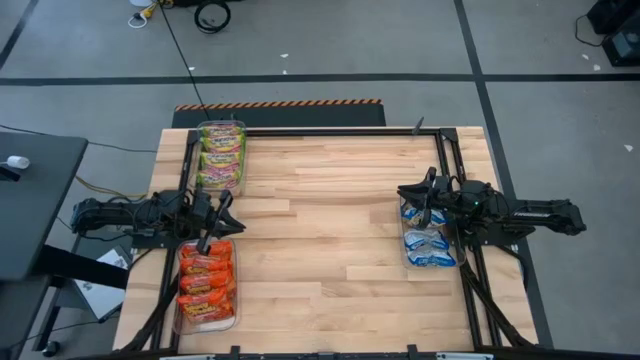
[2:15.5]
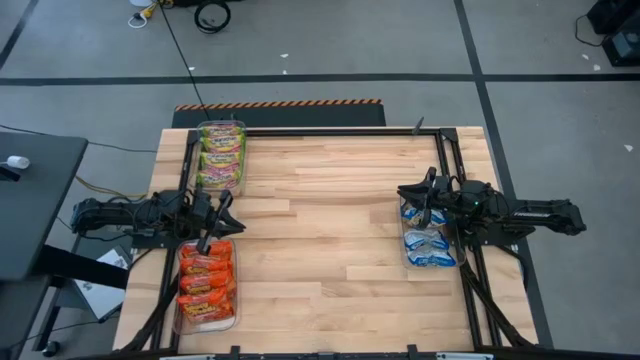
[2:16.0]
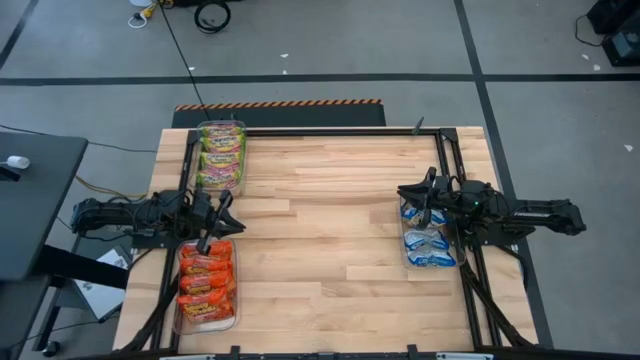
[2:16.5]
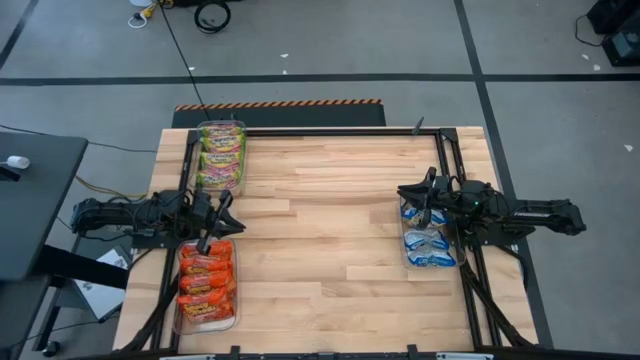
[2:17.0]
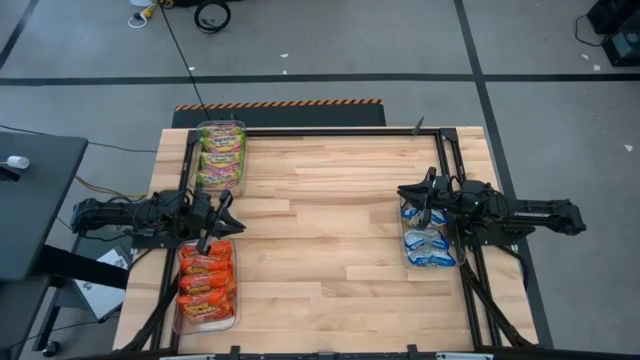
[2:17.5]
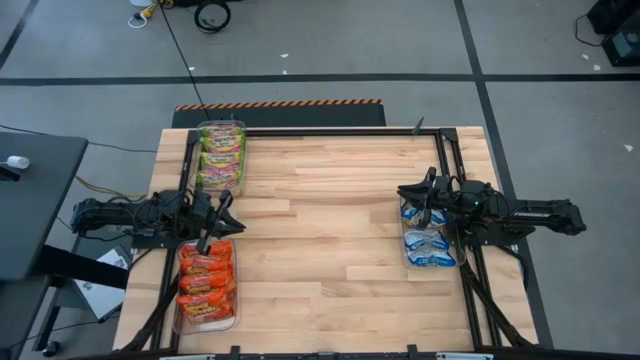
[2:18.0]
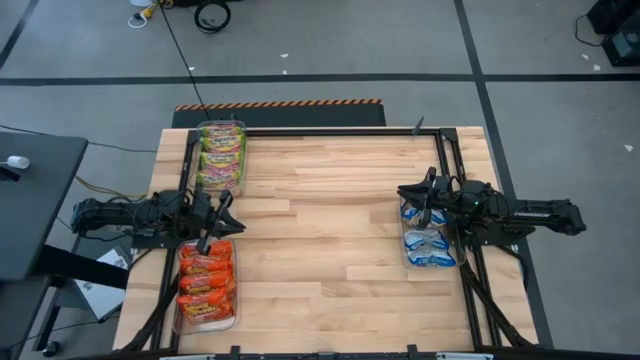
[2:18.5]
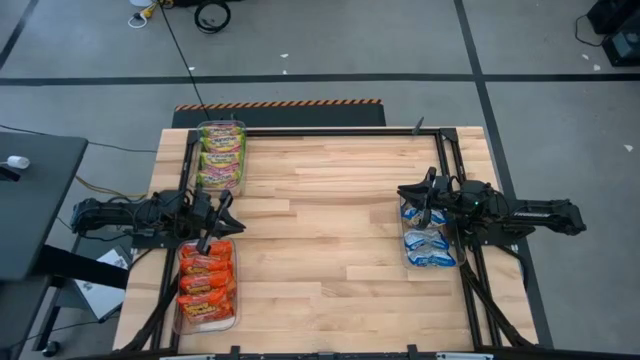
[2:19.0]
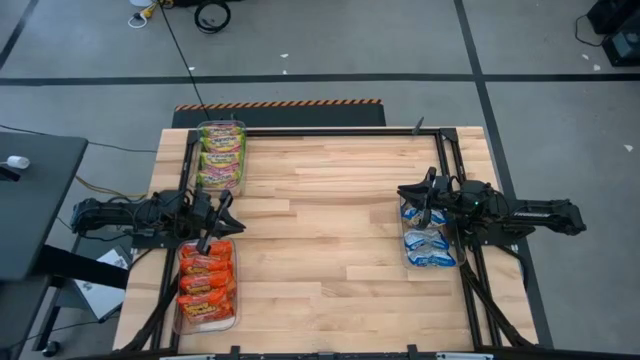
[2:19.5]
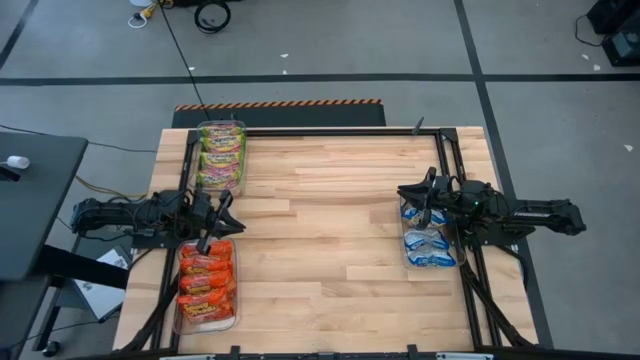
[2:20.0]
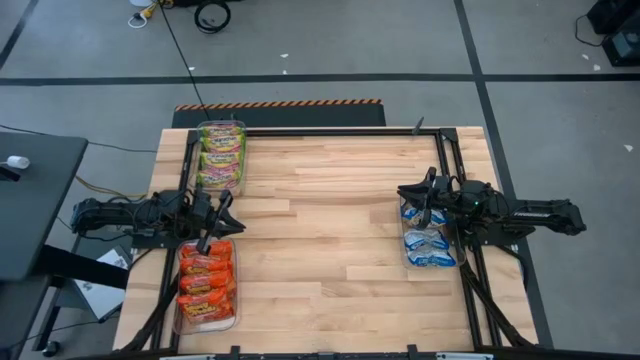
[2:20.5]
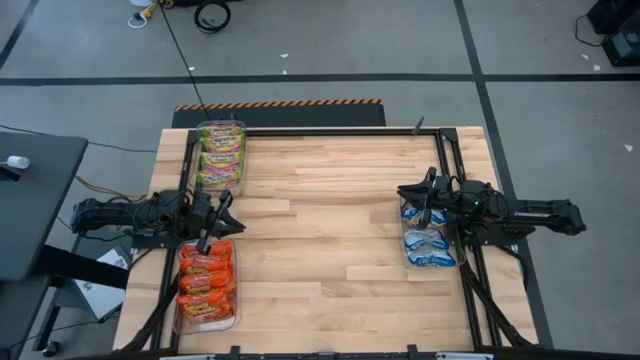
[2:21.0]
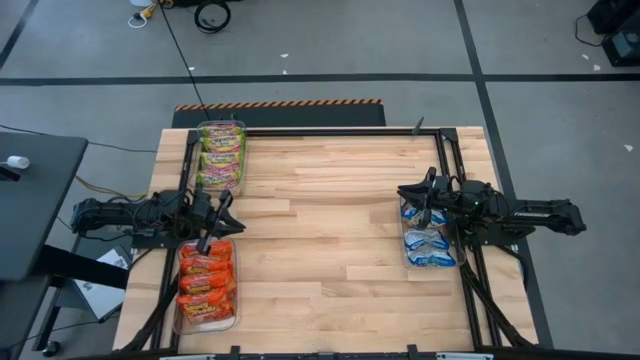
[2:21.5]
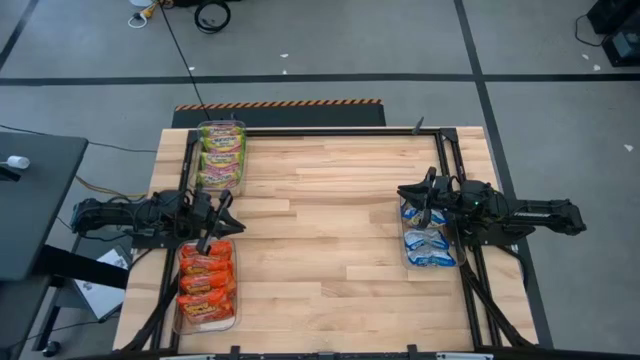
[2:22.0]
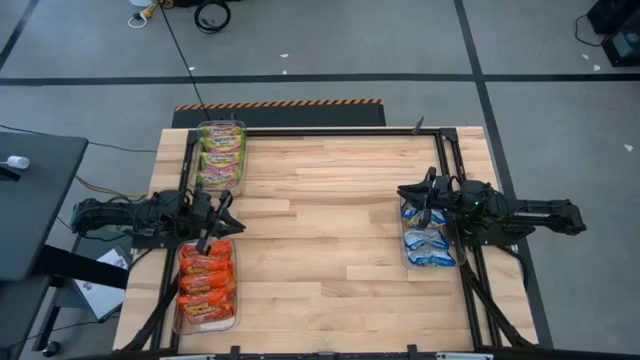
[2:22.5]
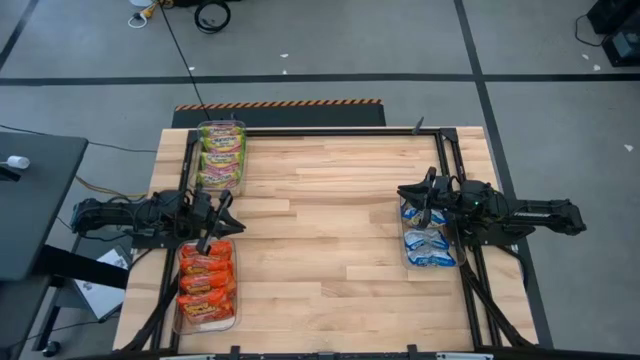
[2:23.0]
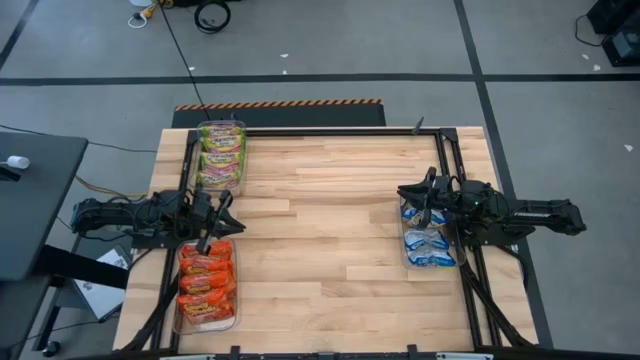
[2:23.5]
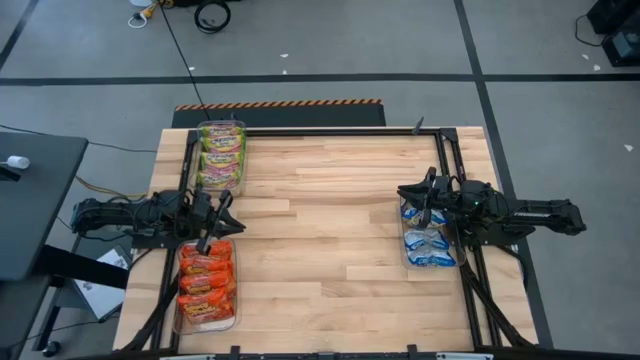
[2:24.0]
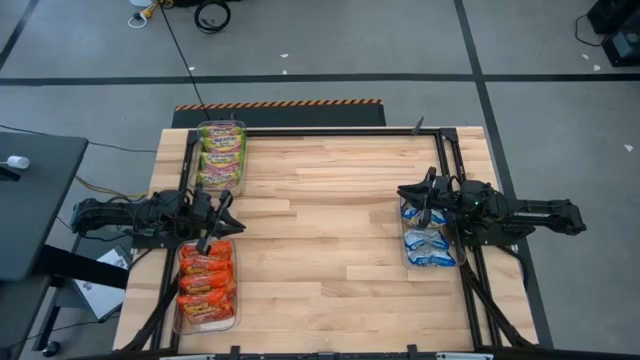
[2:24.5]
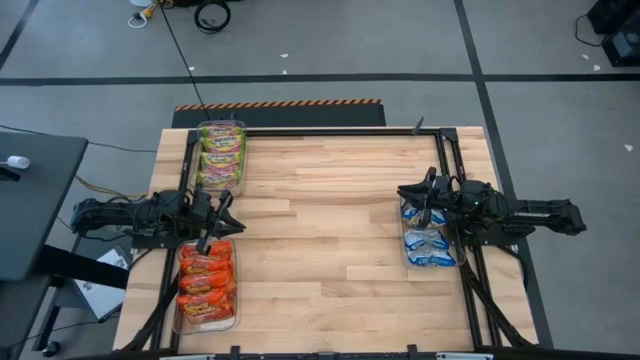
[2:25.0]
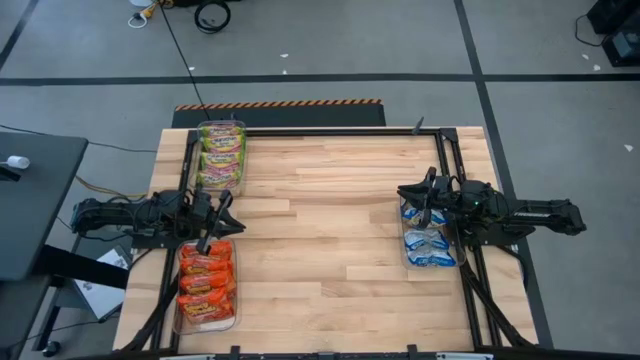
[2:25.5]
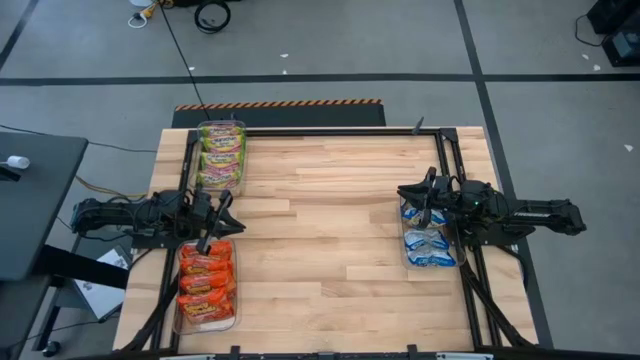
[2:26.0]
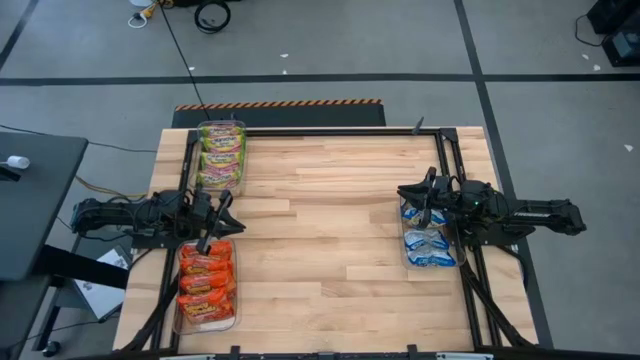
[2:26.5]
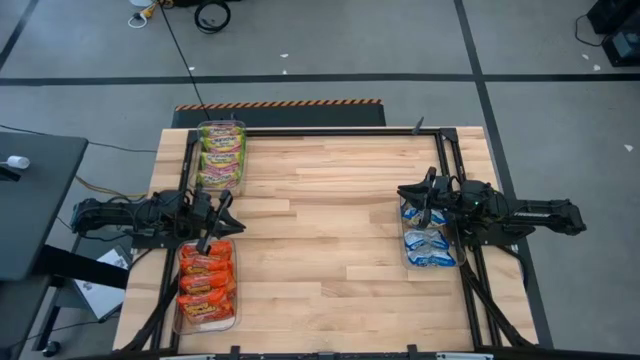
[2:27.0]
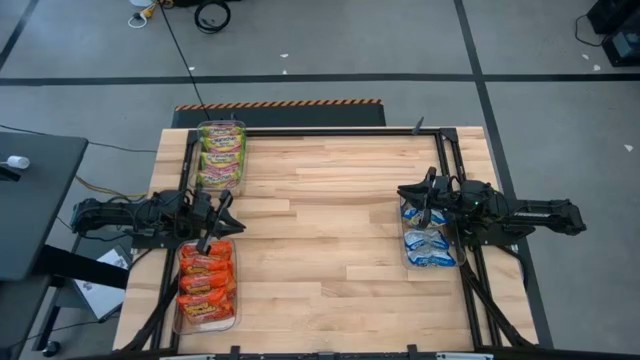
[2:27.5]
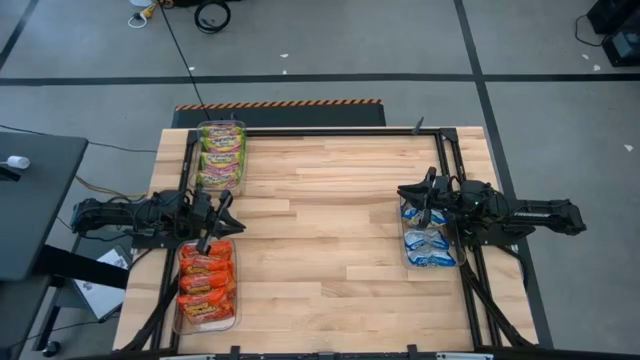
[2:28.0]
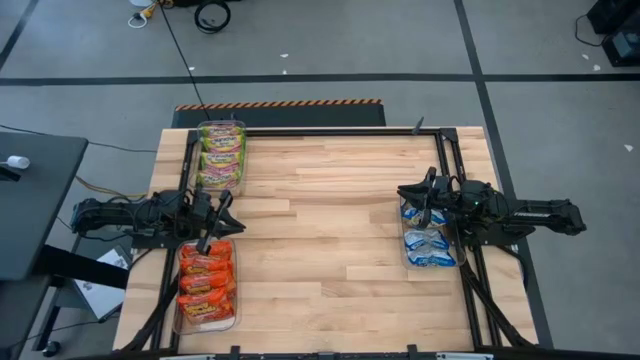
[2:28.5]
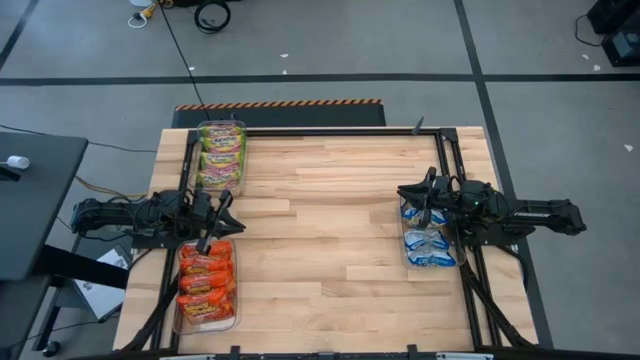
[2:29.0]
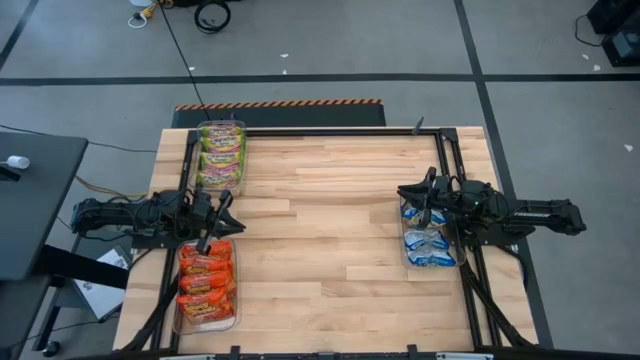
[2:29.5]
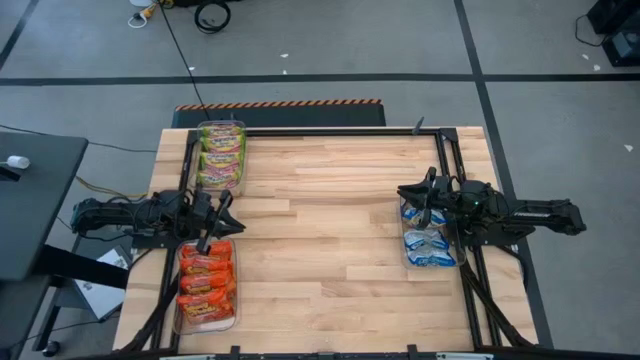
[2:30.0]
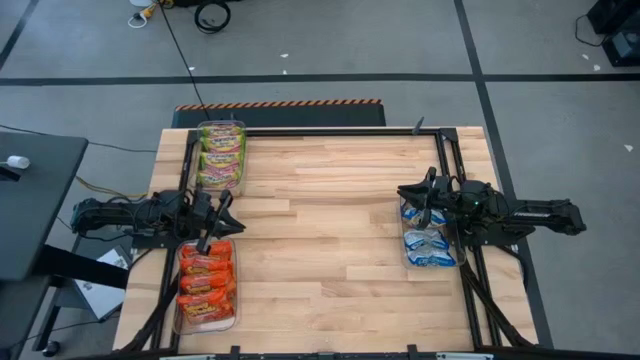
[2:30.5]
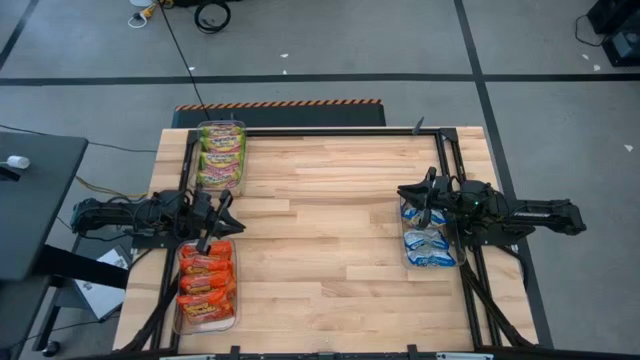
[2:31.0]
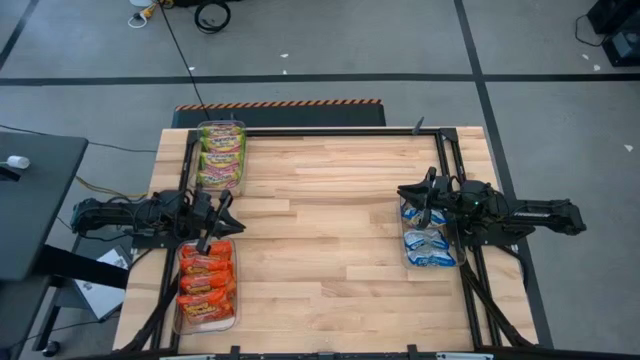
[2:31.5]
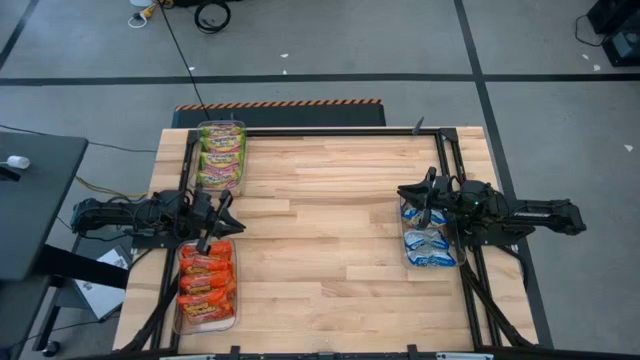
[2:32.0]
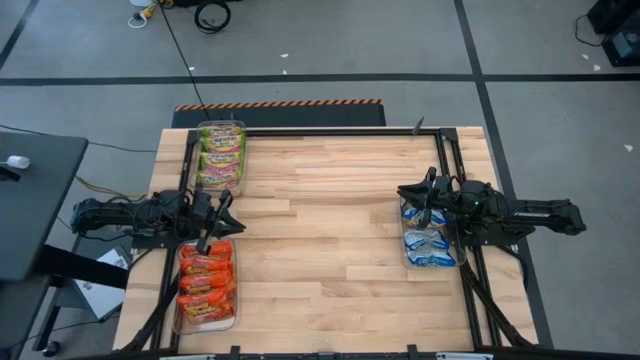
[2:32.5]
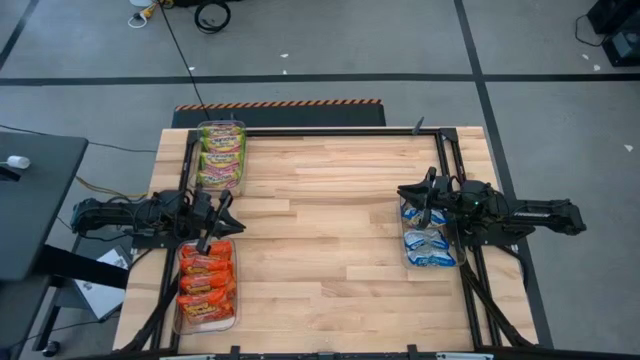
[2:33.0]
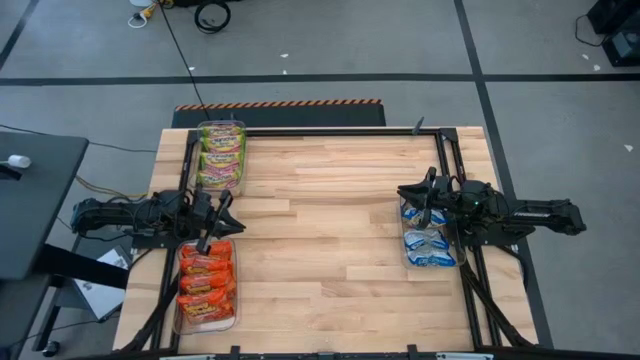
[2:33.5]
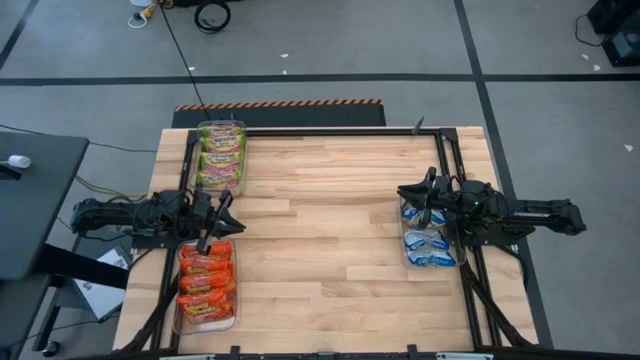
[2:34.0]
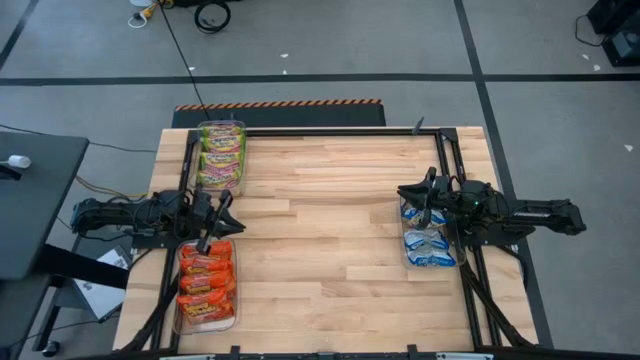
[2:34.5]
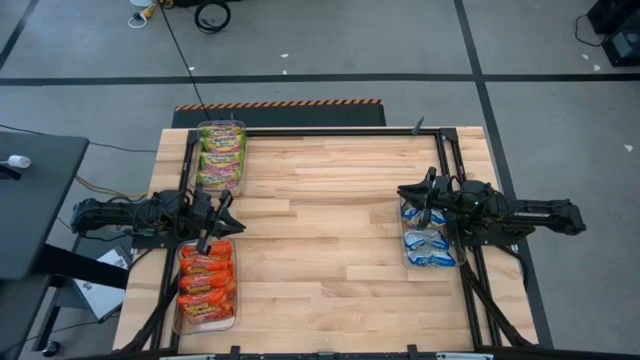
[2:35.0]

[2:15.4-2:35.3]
Task: Sort Maruchan noodles
Return to Home Position
